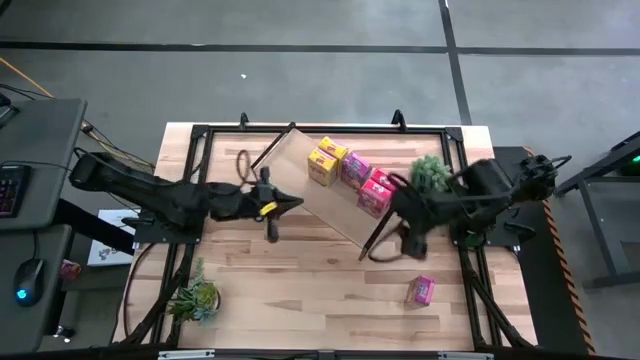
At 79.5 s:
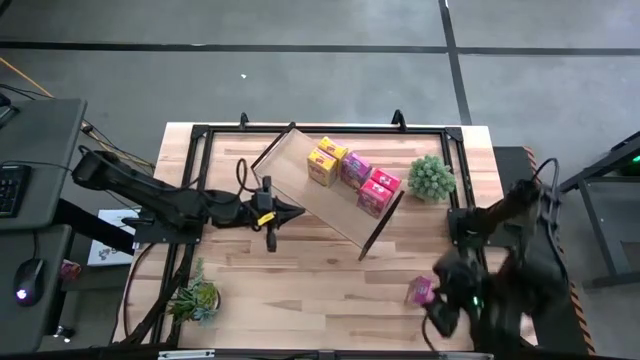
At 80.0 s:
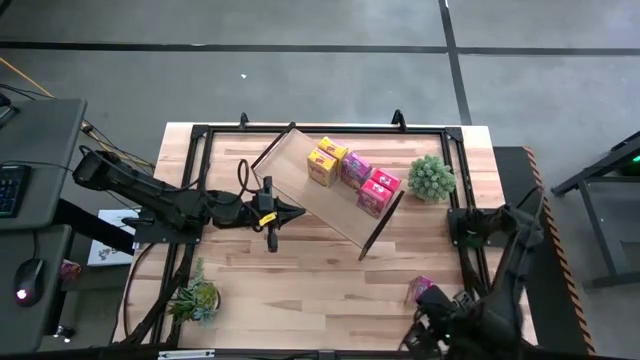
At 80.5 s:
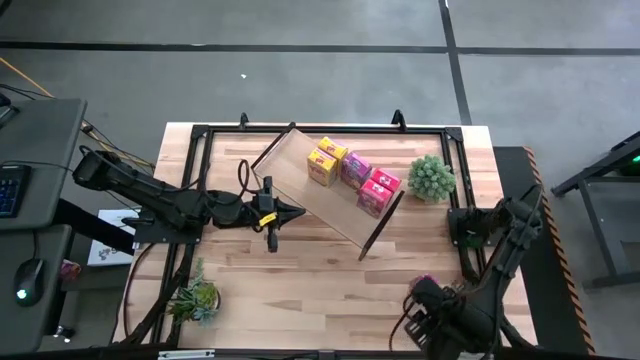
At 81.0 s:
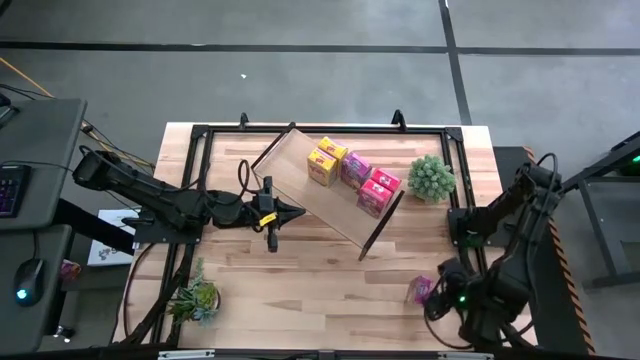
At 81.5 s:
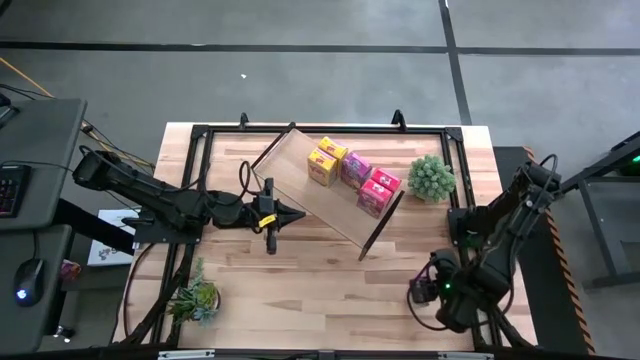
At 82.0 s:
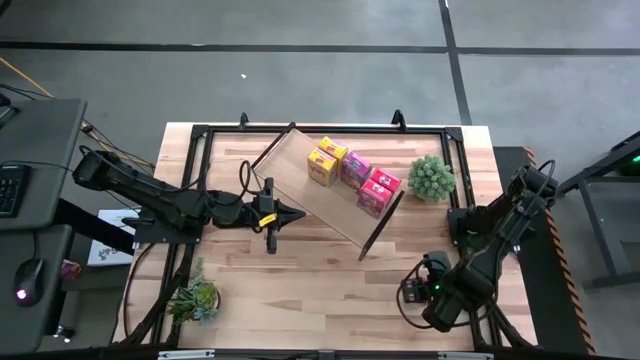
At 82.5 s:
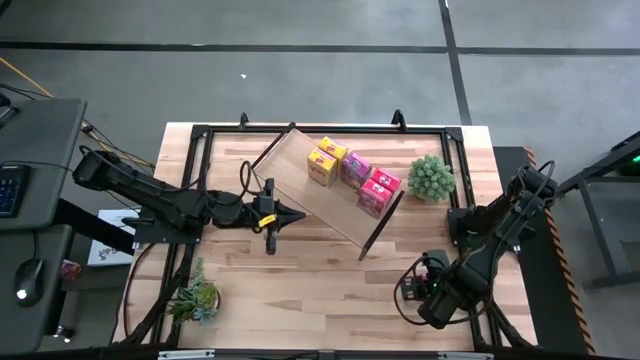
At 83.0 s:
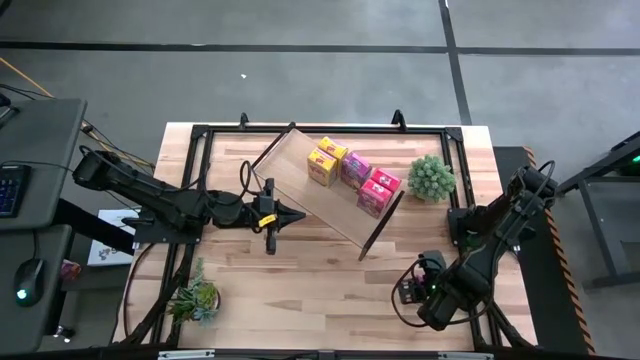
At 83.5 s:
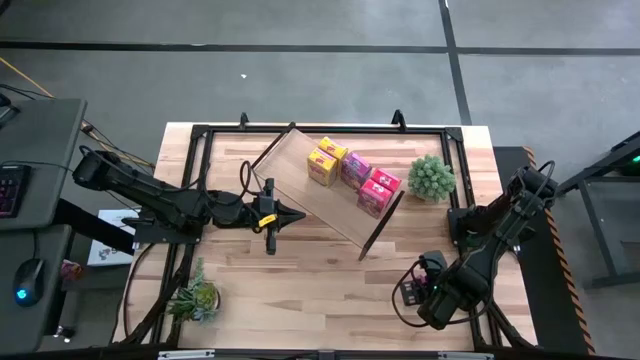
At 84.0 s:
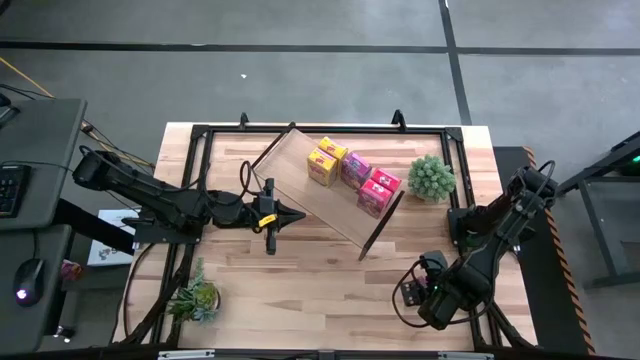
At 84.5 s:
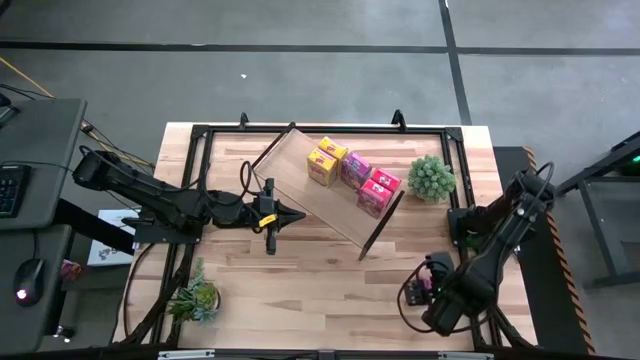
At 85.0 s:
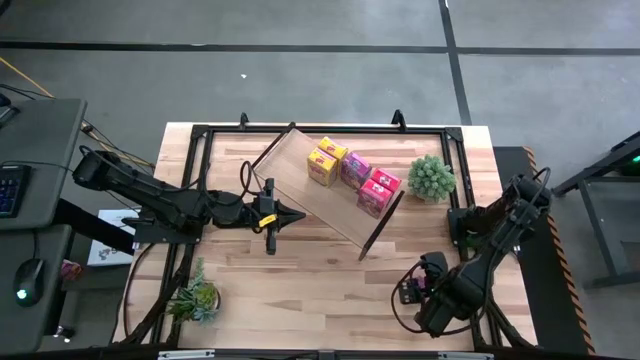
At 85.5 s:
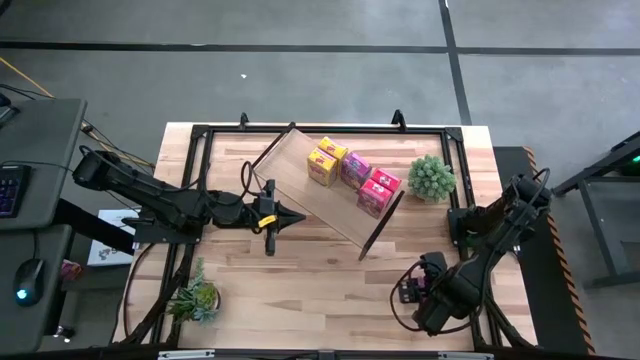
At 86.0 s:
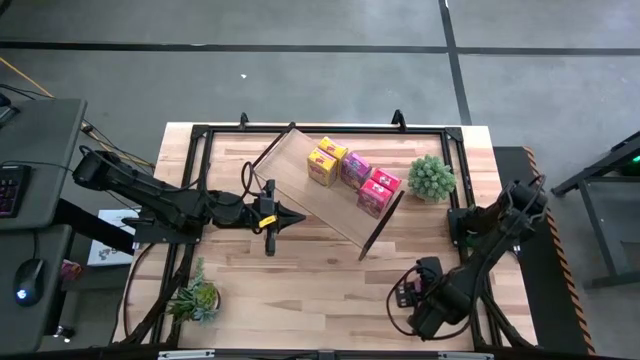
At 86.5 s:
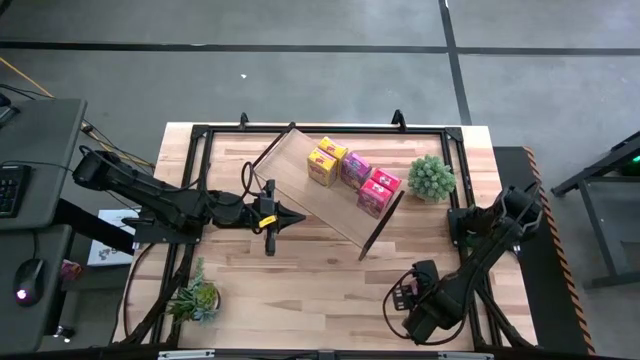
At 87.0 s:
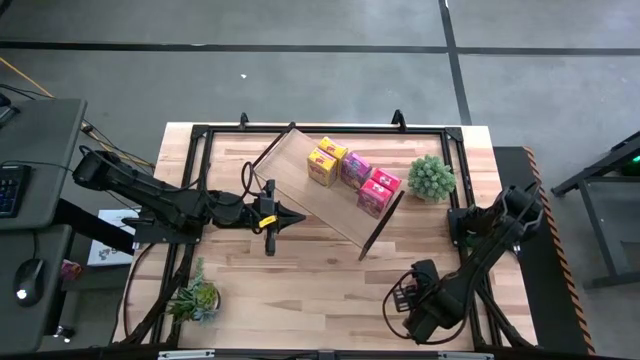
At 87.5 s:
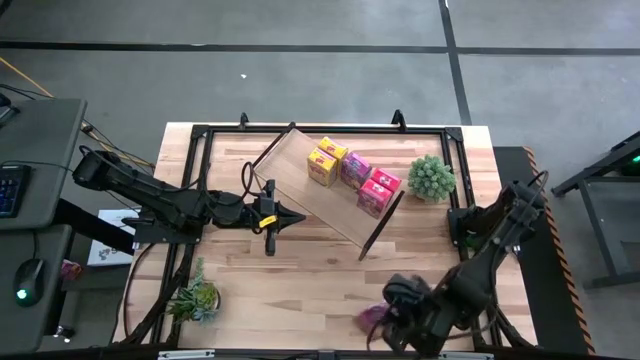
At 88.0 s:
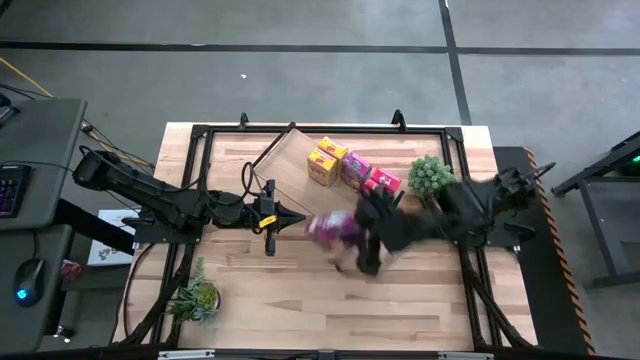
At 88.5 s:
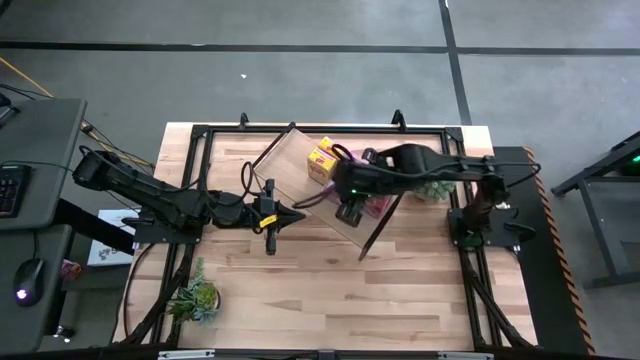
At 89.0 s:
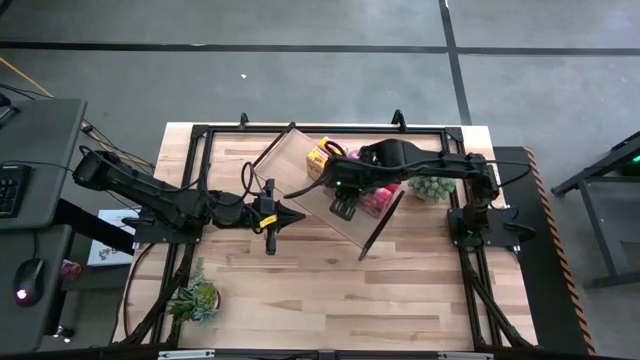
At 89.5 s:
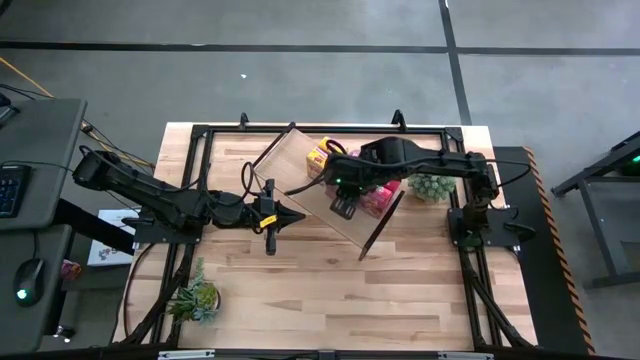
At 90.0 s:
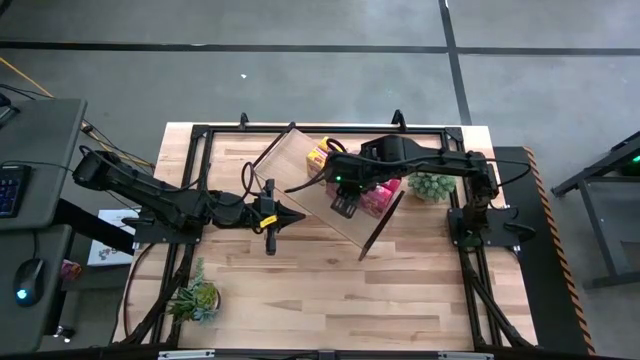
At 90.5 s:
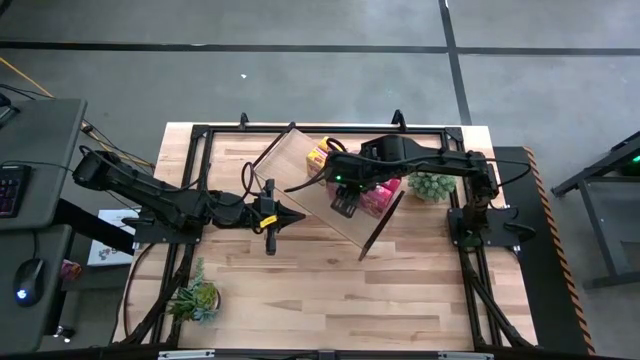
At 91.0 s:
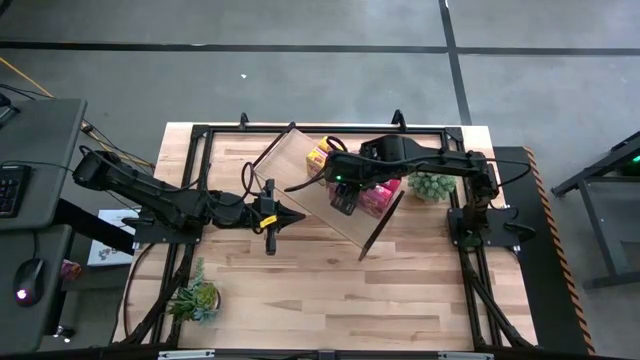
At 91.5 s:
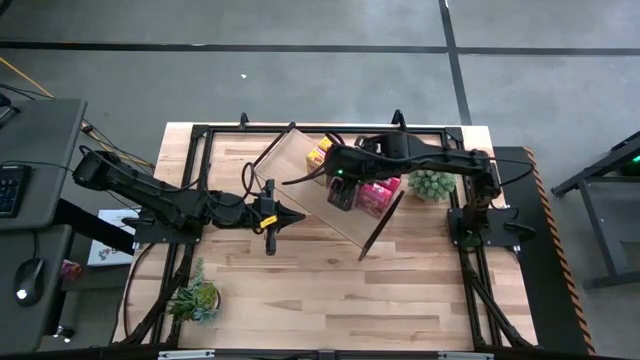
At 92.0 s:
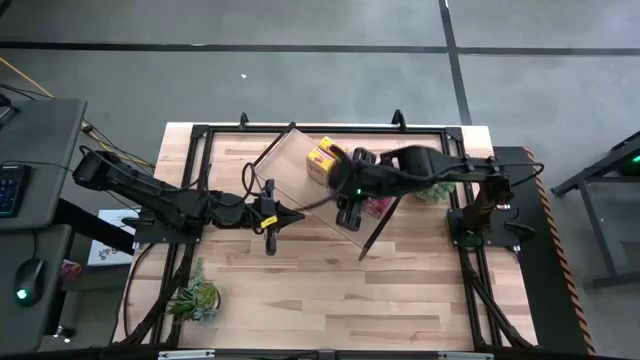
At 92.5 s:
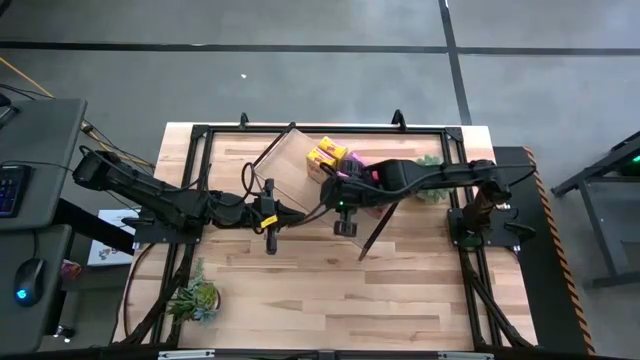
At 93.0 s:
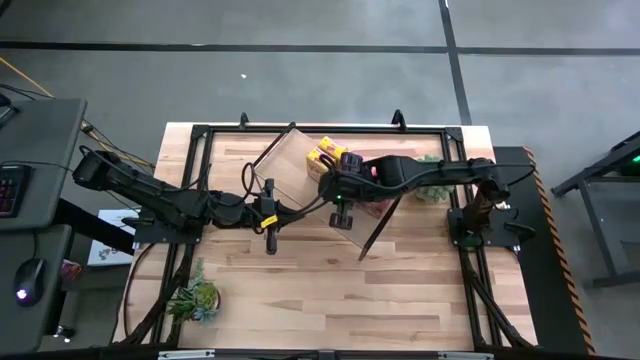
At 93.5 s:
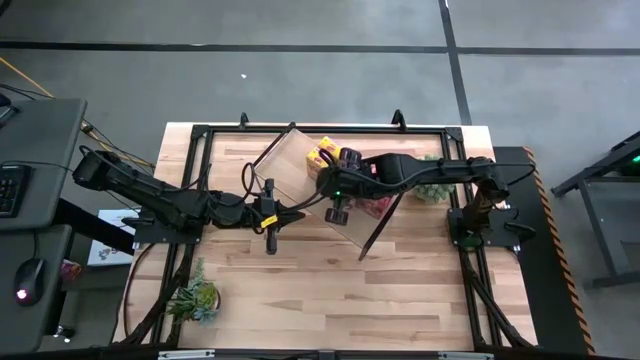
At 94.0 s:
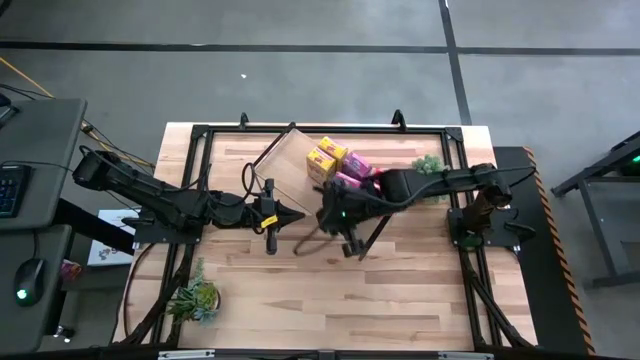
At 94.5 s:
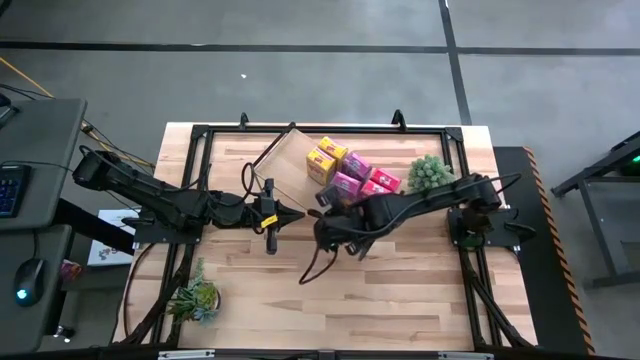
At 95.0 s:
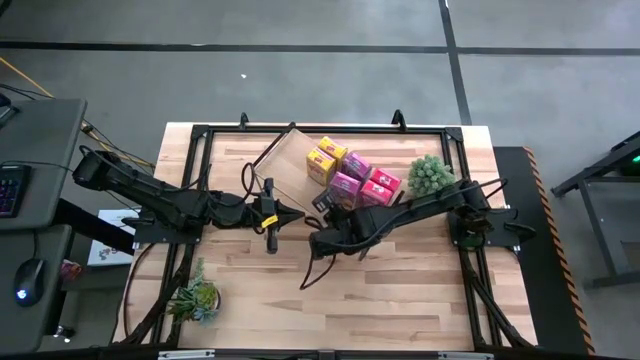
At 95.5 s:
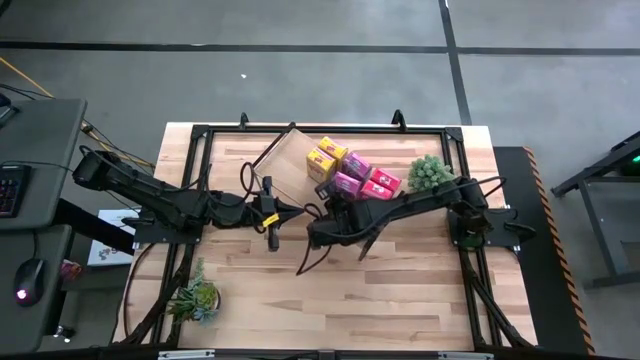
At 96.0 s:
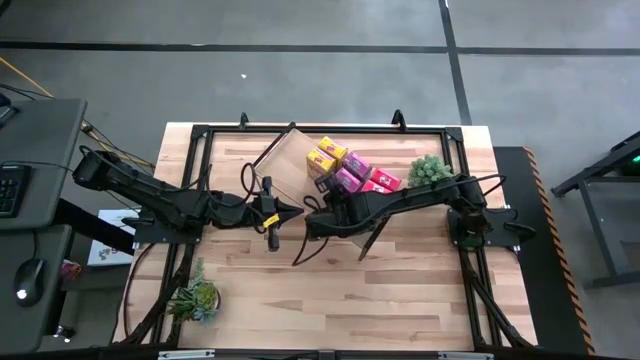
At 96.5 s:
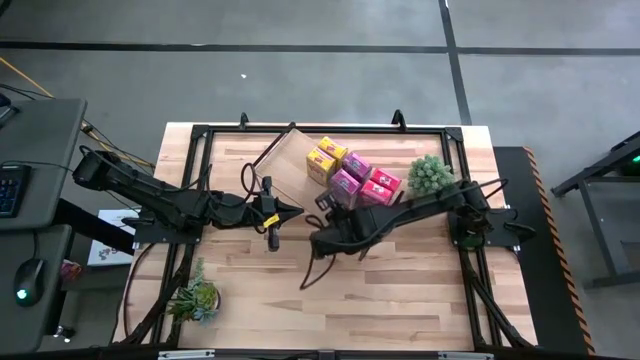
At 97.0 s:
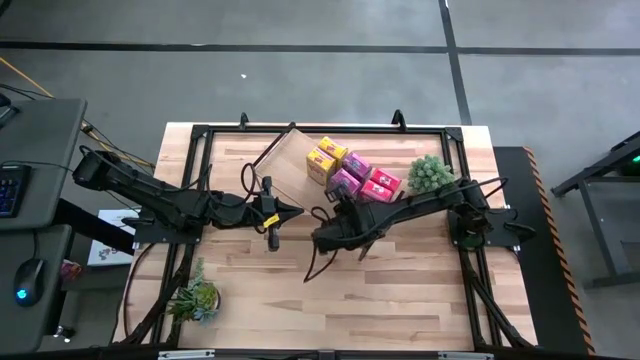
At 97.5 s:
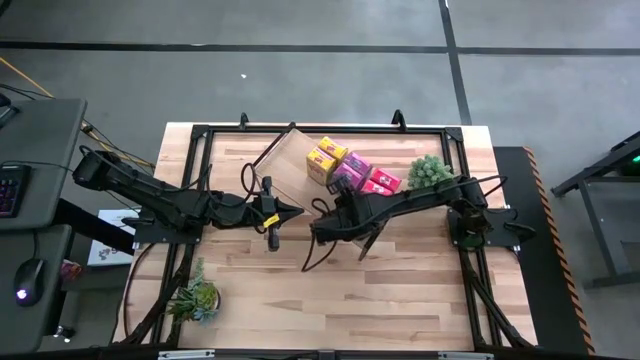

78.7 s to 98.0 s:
Task: Stack cereal on shelf
Put the purple cereal box on the shelf

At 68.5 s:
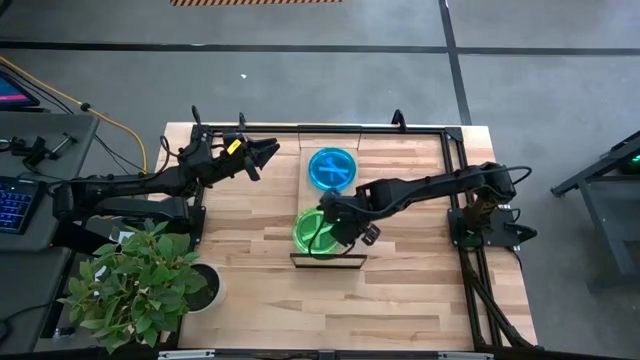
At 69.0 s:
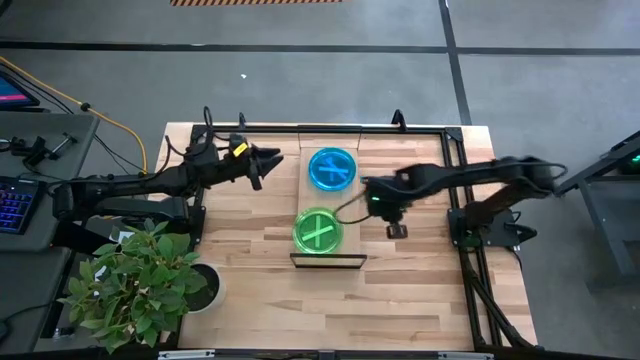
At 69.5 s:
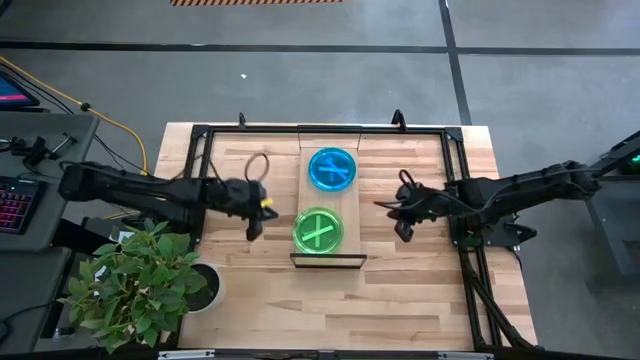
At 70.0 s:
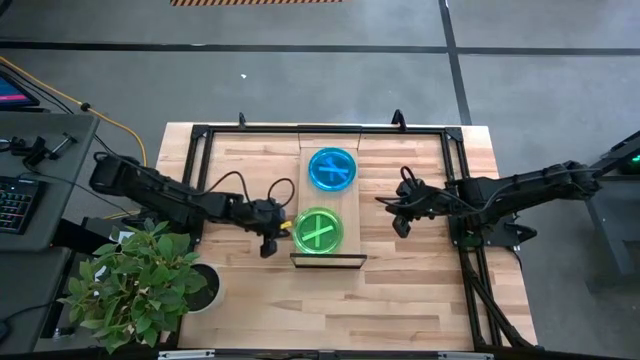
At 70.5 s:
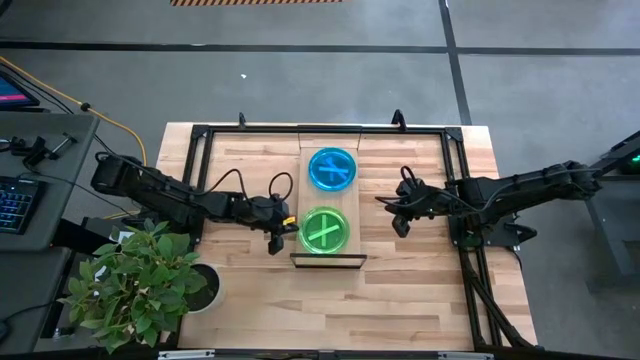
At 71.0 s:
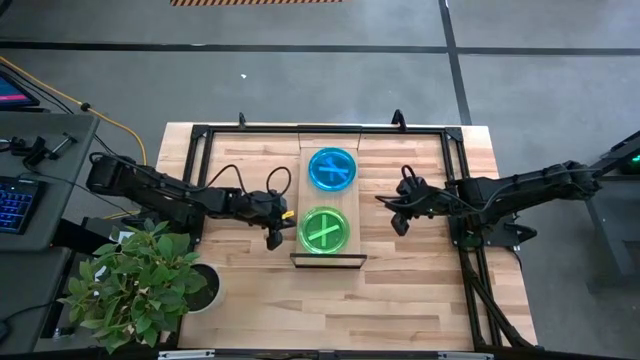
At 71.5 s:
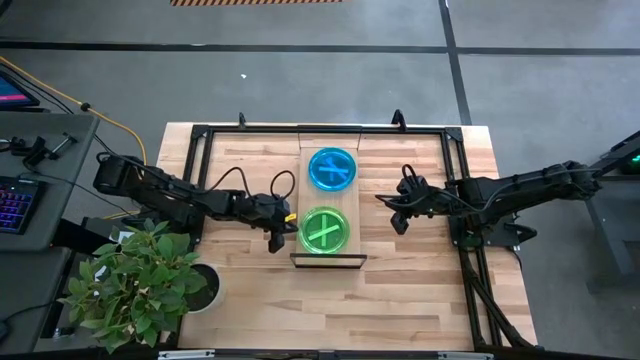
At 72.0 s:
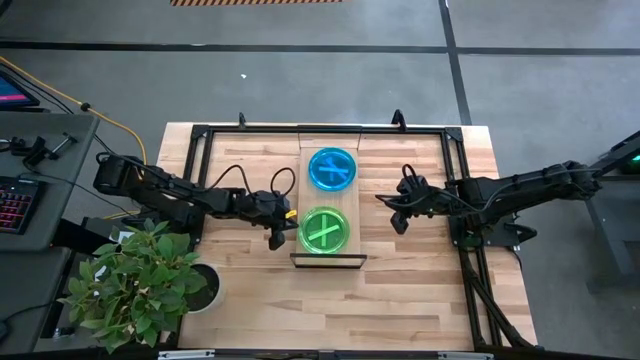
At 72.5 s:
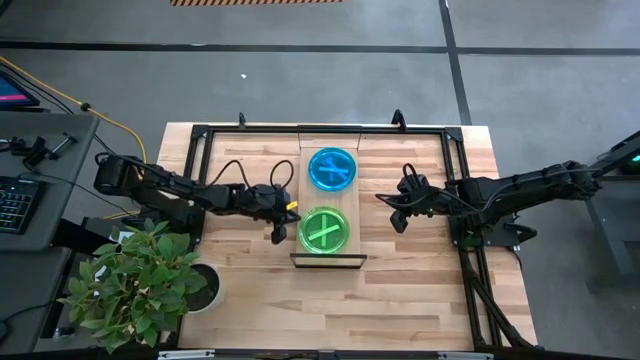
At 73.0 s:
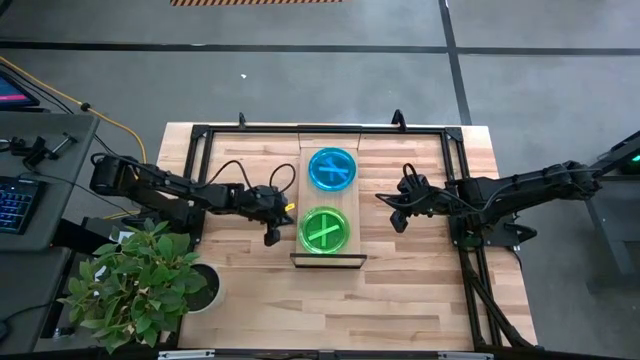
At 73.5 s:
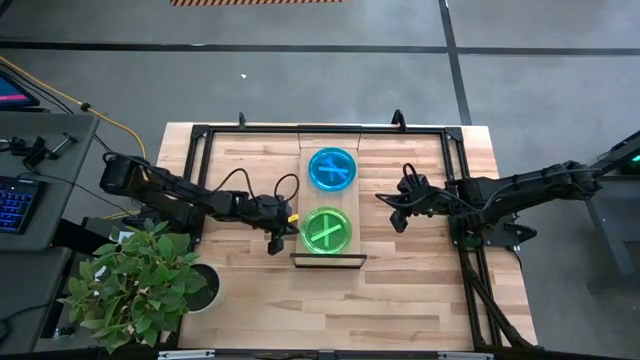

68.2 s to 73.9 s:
Task: Place and stack plates onto a shelf
Adjust the stacked green plates on the shelf
